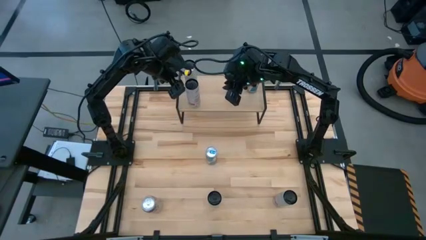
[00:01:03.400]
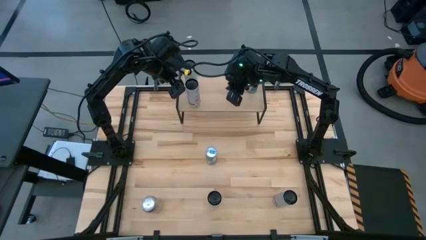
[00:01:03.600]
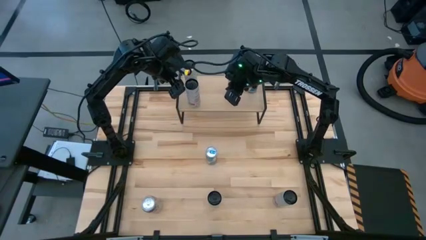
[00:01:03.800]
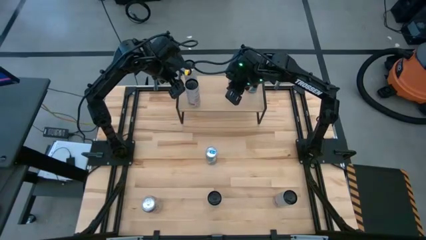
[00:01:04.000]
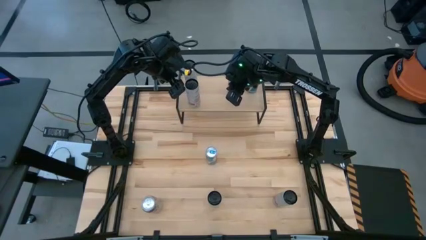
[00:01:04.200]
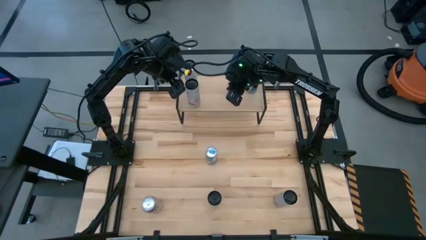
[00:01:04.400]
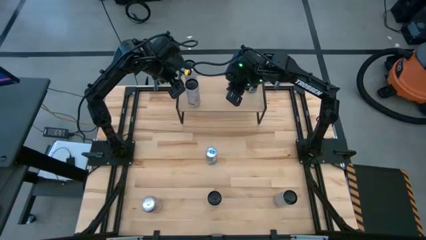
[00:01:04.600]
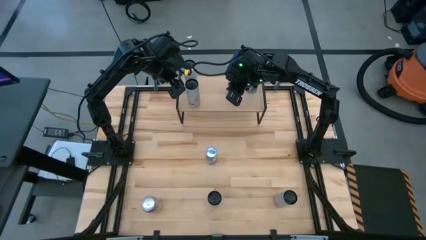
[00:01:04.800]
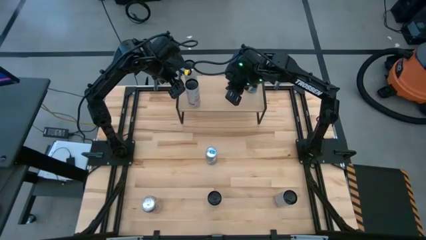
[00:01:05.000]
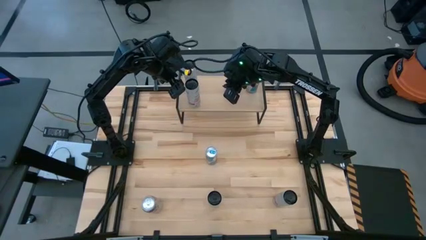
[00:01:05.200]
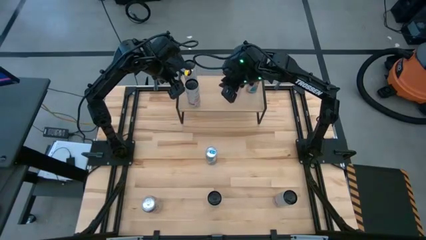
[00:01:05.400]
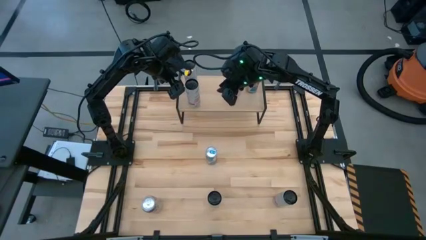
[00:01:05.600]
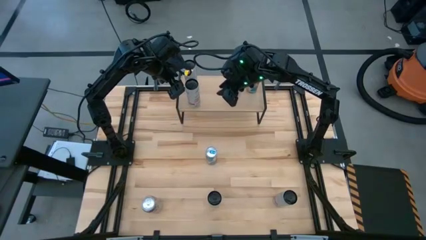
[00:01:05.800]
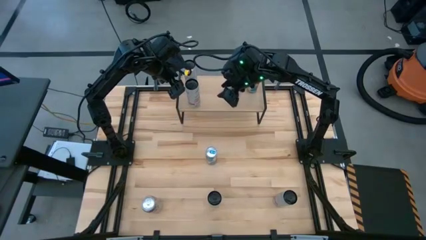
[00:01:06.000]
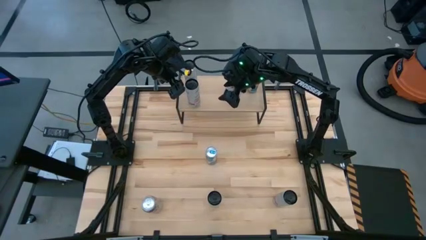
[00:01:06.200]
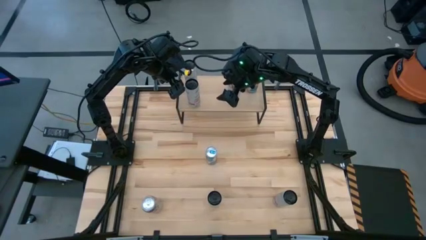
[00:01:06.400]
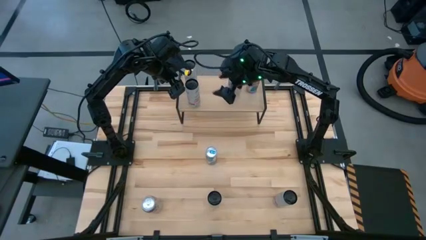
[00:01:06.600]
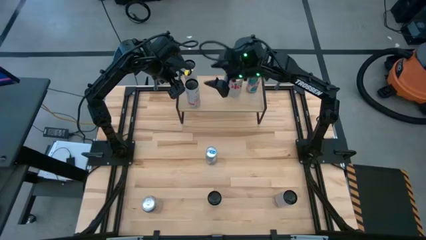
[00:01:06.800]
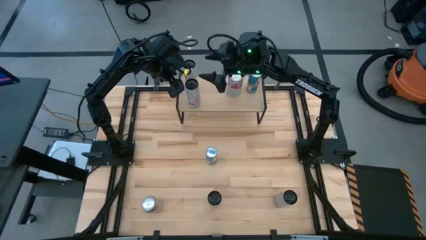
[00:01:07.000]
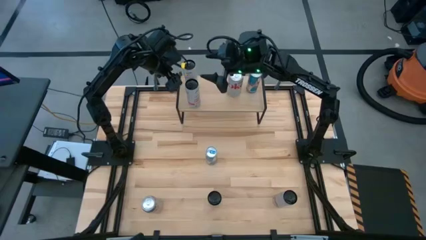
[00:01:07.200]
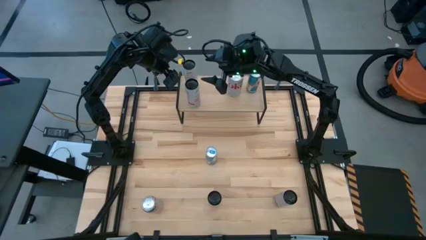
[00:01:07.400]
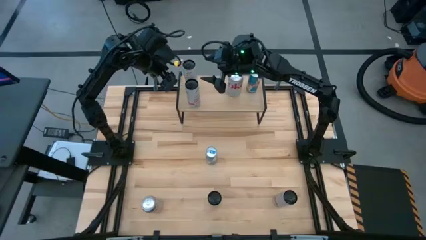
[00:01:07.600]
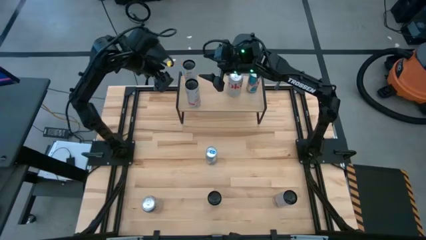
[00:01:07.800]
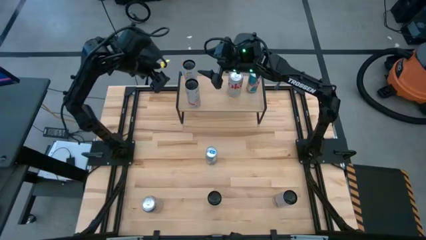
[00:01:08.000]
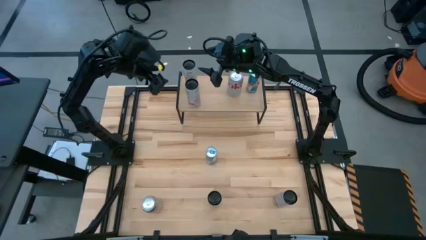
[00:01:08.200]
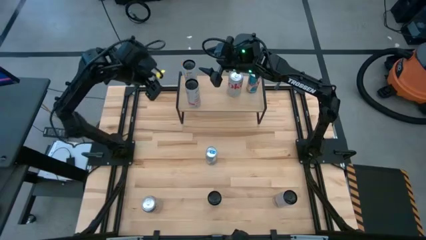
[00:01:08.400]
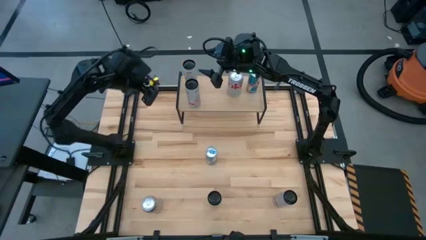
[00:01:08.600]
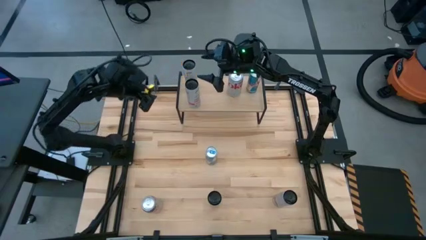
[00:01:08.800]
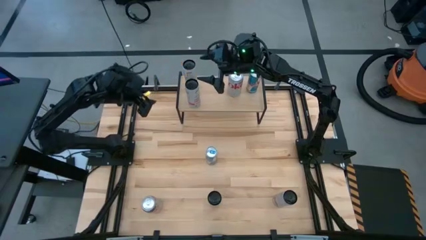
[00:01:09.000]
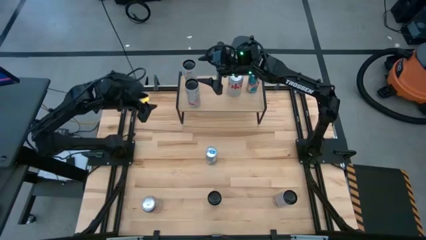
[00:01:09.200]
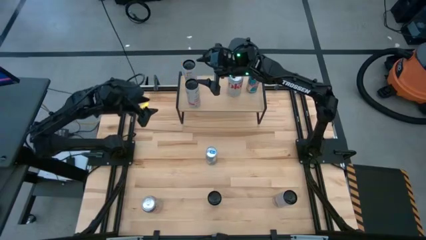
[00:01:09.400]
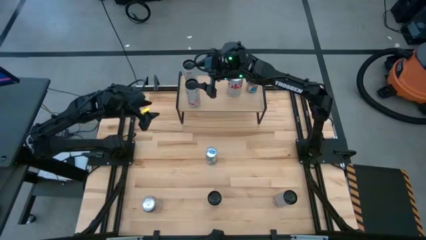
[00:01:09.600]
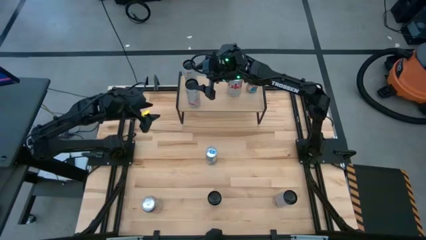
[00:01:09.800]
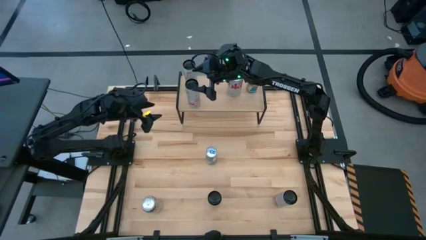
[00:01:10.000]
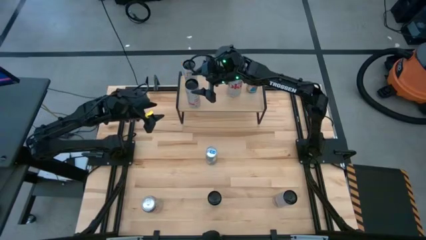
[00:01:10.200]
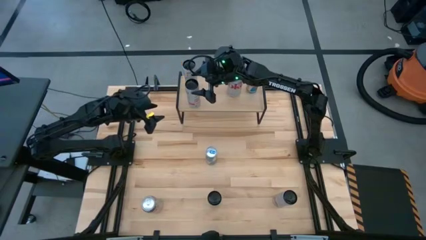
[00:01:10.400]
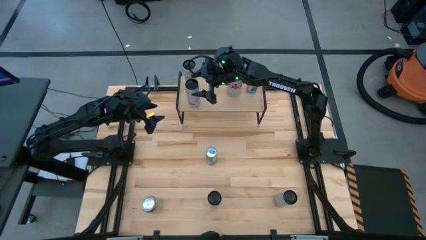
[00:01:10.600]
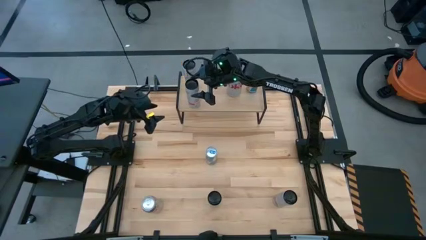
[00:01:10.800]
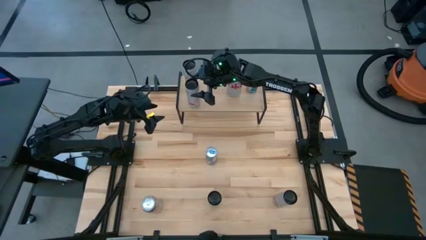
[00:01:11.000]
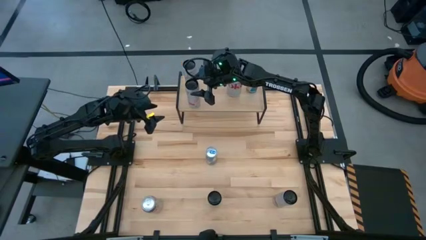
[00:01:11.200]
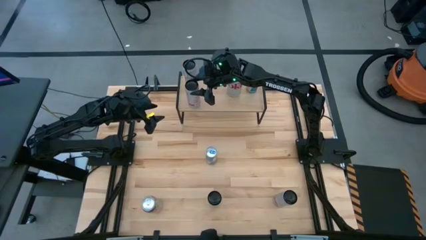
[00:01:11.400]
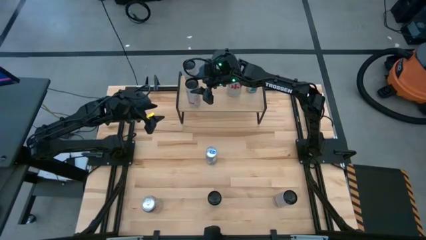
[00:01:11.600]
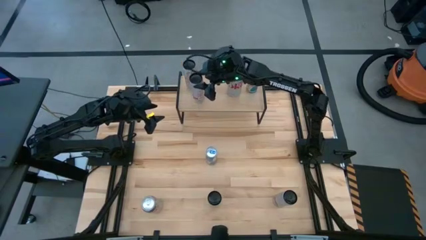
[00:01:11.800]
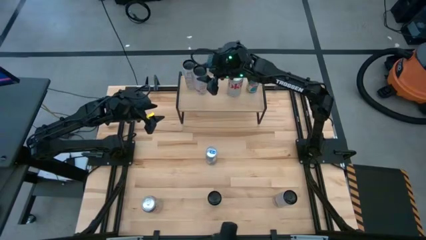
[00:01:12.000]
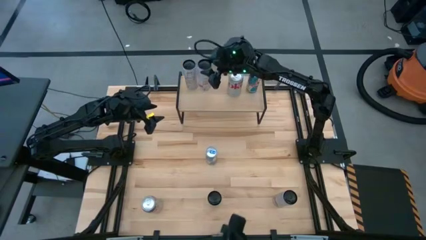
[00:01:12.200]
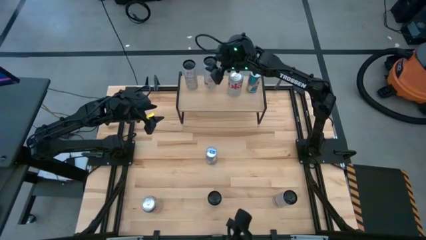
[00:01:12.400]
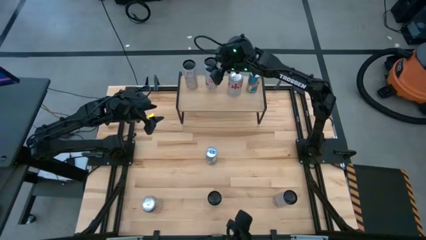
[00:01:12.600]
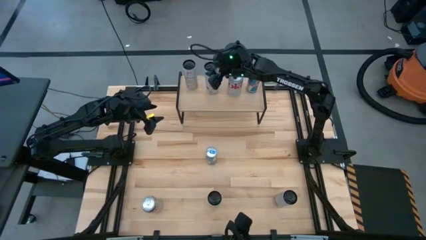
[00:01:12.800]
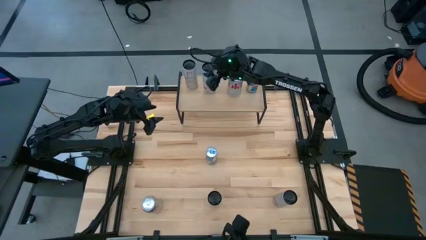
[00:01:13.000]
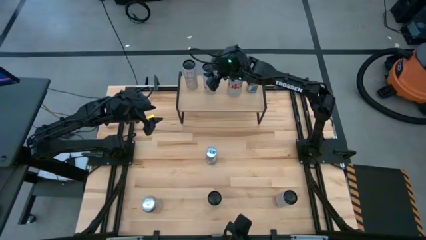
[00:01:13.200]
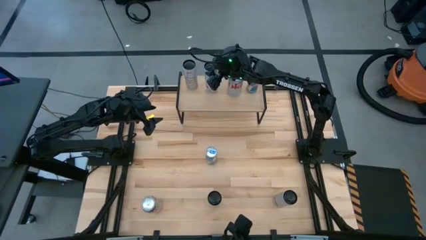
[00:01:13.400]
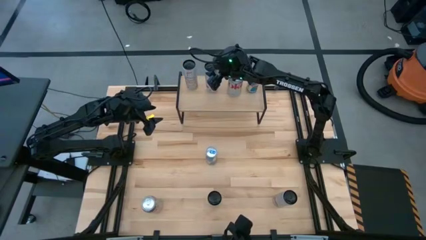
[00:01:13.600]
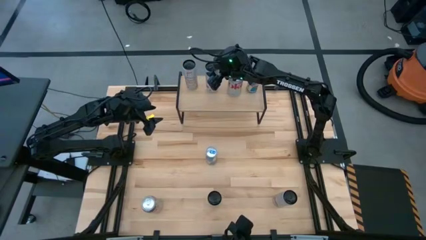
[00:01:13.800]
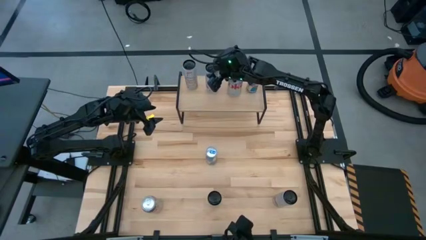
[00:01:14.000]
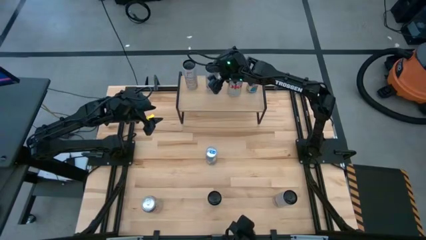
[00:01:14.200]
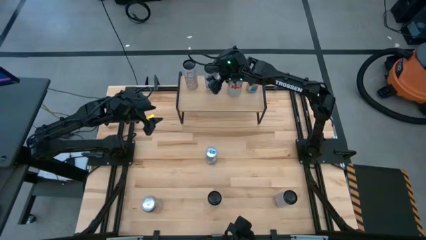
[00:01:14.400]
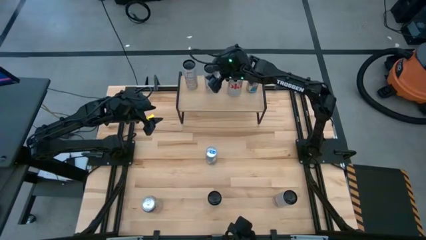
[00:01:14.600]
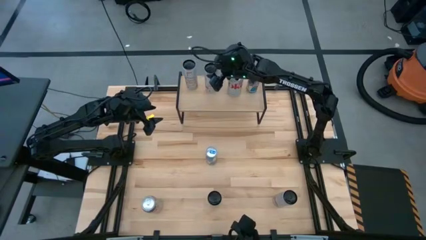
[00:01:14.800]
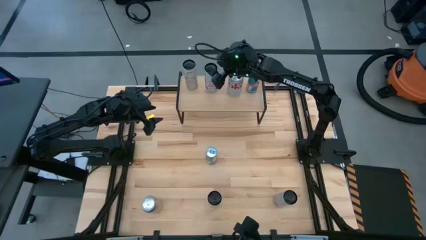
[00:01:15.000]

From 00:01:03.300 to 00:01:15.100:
Task: Place canned beverage on shelf
Put the white soda can on the shelf
